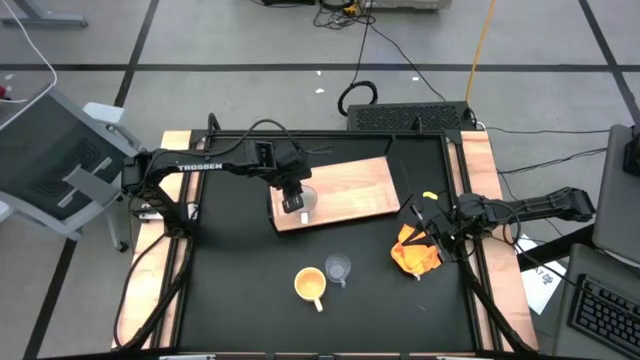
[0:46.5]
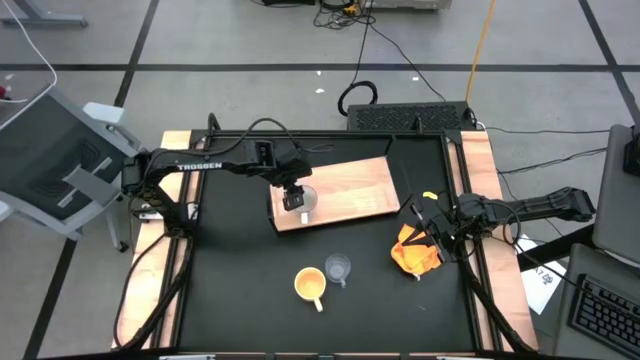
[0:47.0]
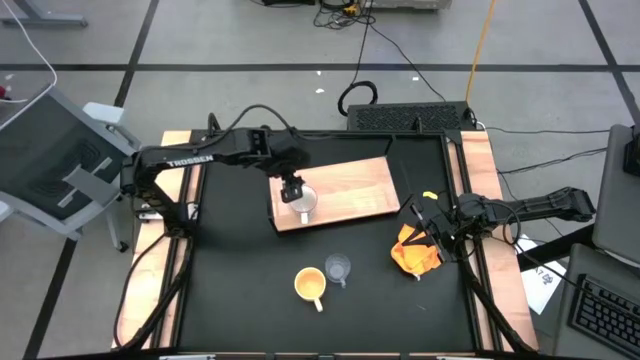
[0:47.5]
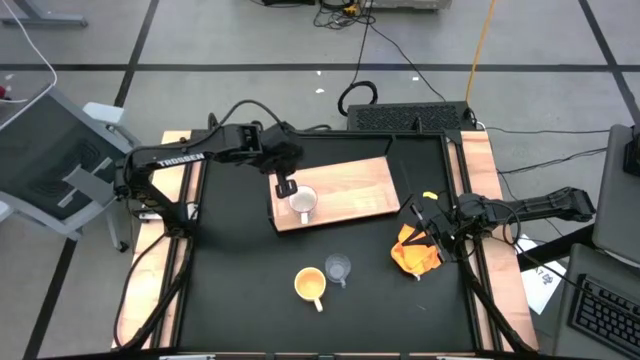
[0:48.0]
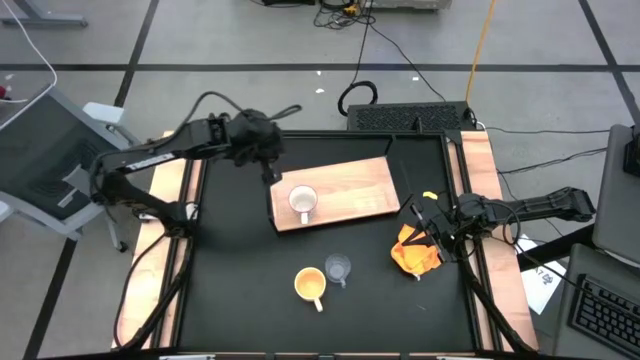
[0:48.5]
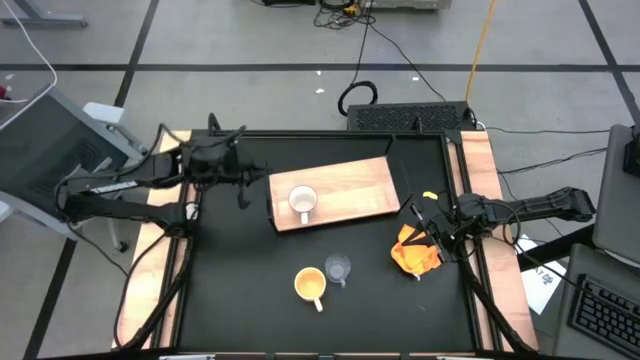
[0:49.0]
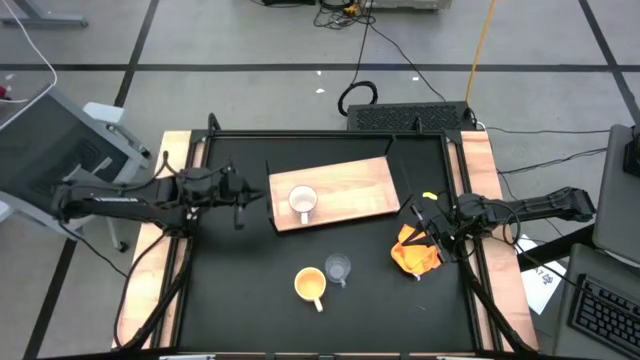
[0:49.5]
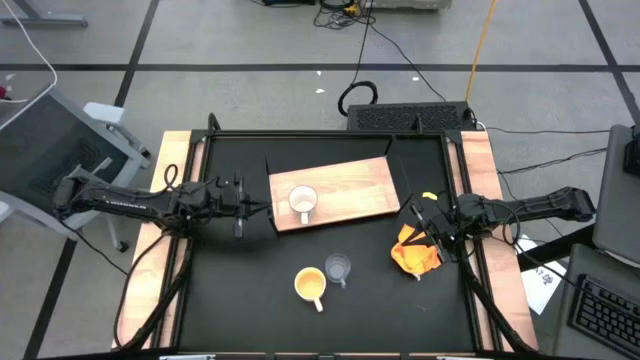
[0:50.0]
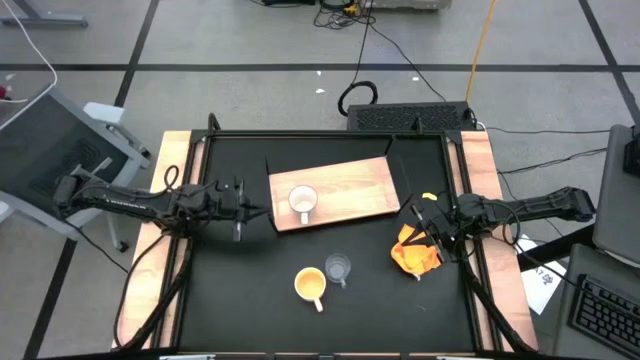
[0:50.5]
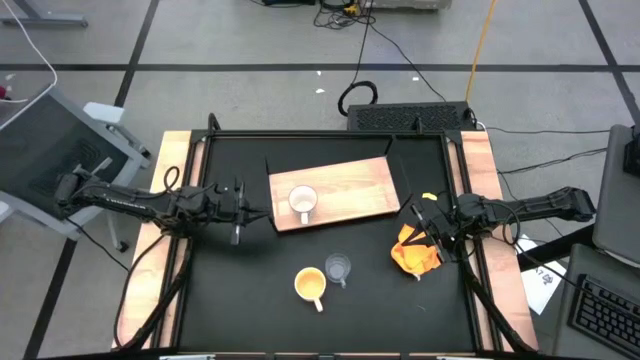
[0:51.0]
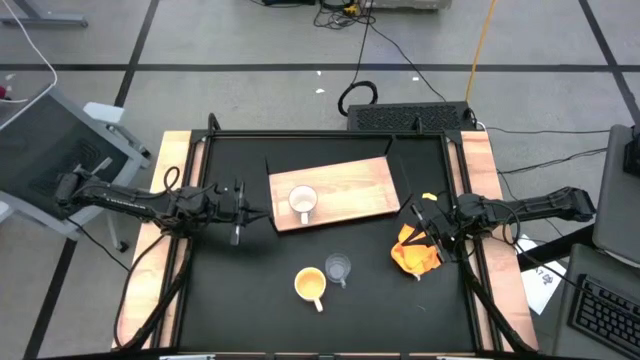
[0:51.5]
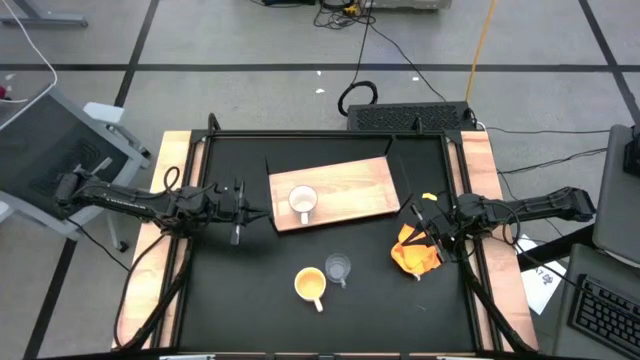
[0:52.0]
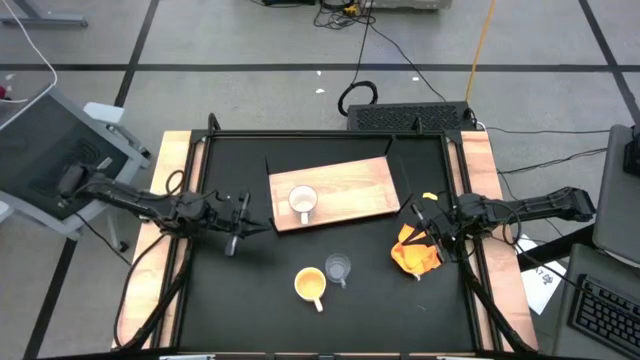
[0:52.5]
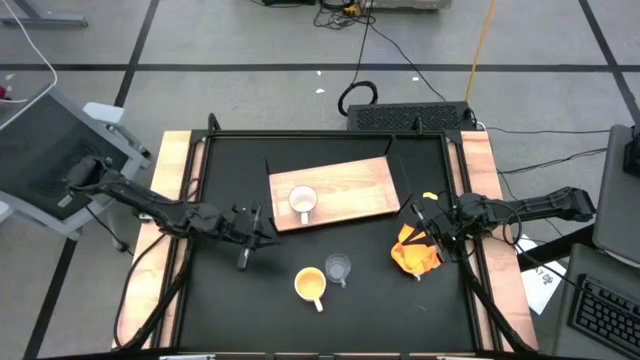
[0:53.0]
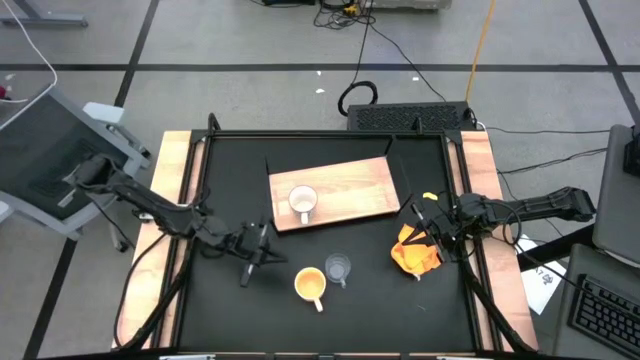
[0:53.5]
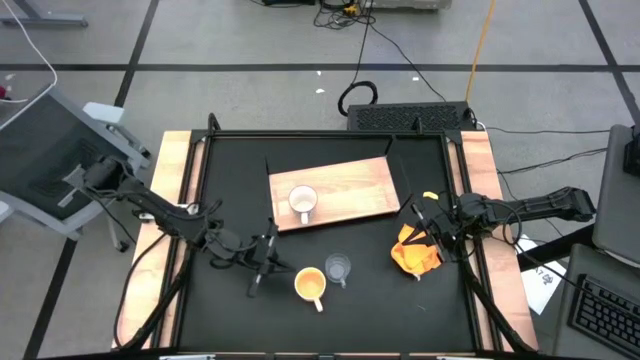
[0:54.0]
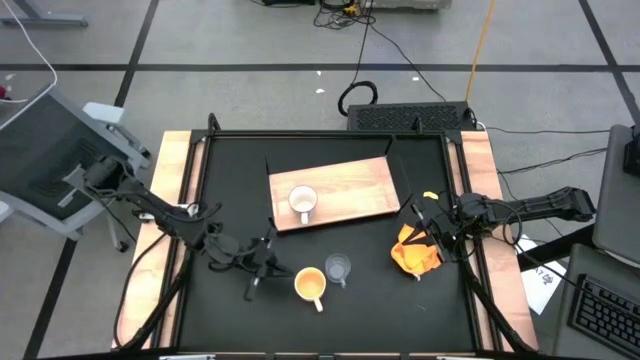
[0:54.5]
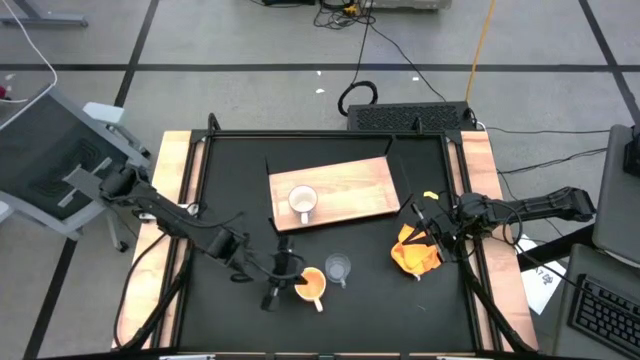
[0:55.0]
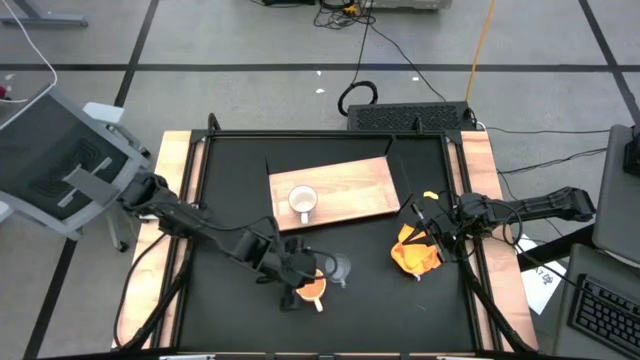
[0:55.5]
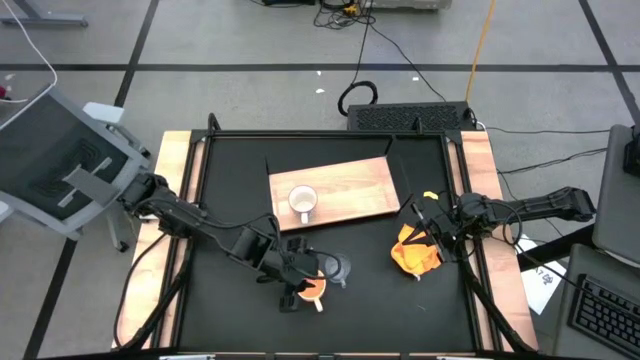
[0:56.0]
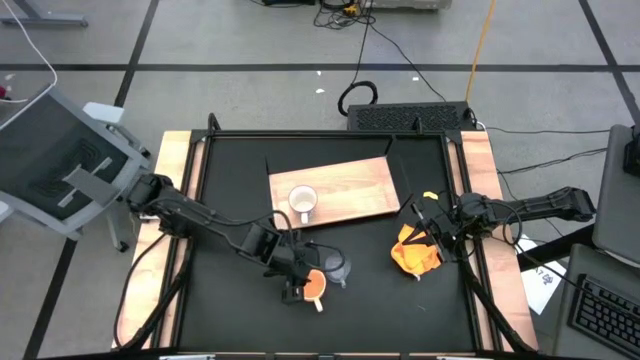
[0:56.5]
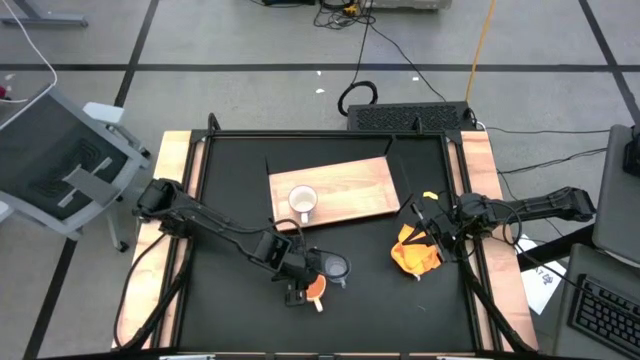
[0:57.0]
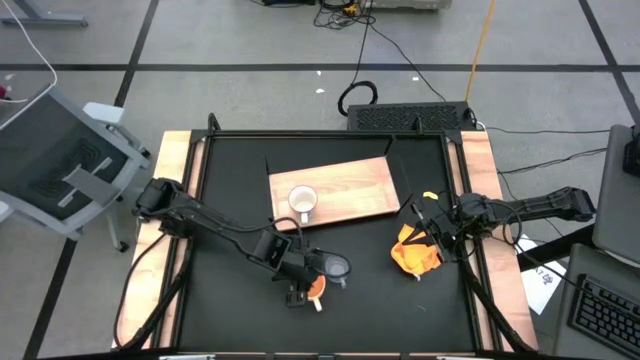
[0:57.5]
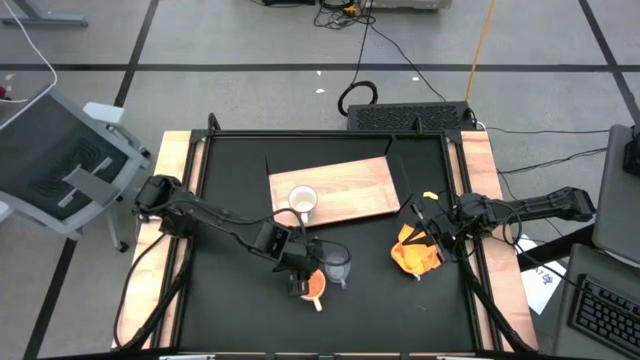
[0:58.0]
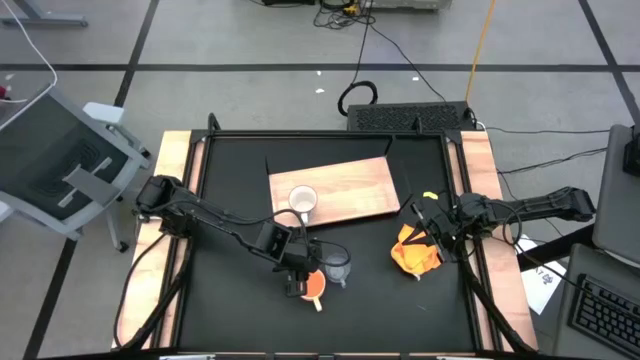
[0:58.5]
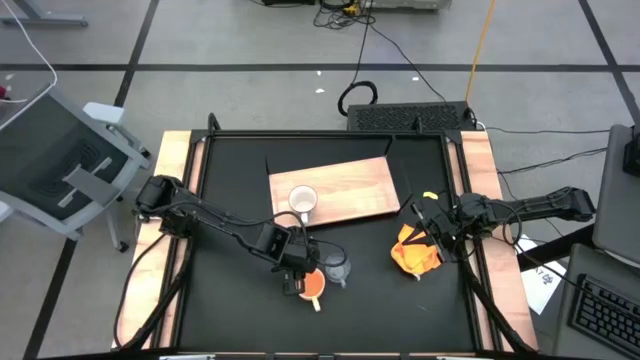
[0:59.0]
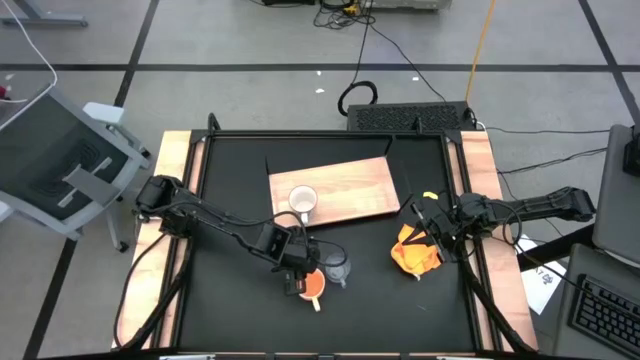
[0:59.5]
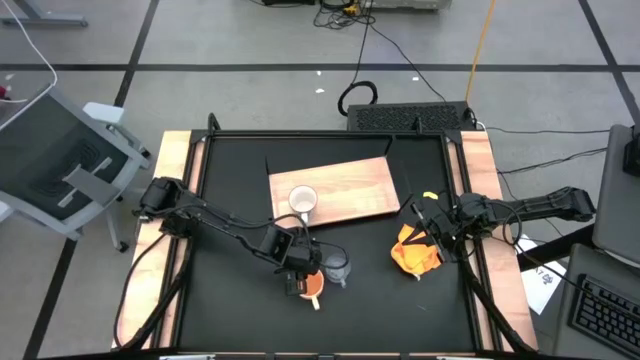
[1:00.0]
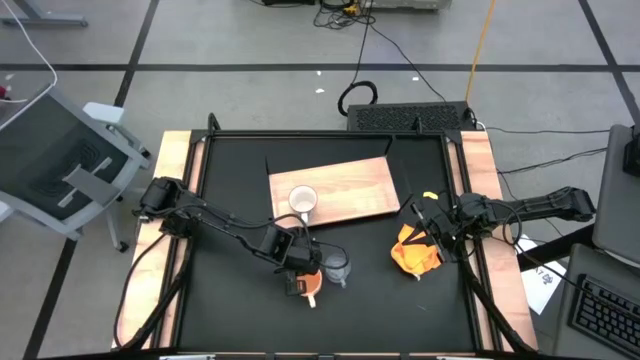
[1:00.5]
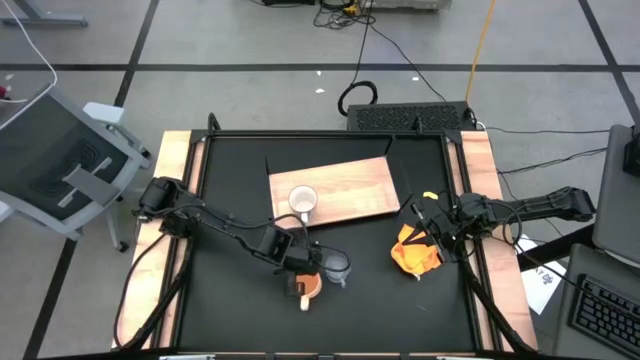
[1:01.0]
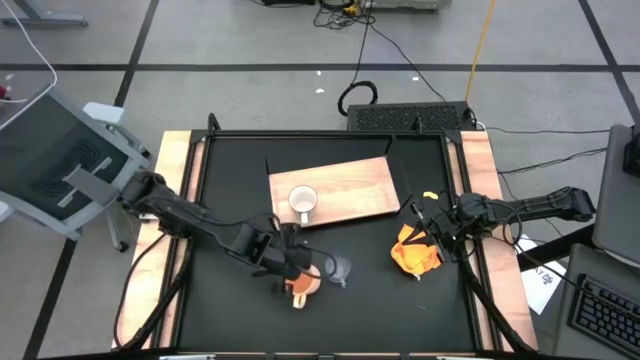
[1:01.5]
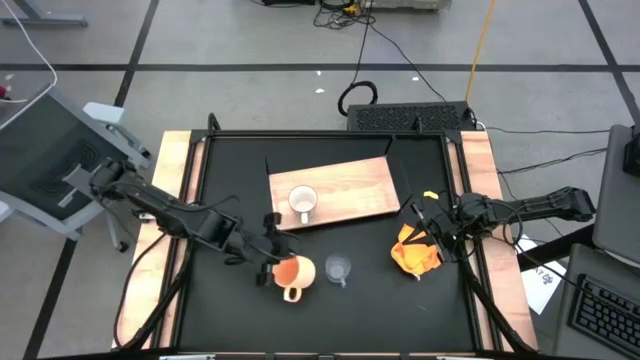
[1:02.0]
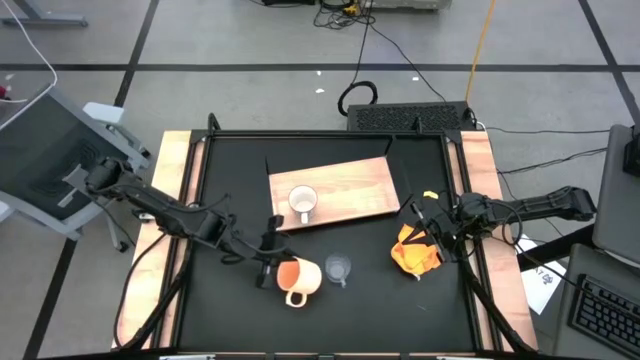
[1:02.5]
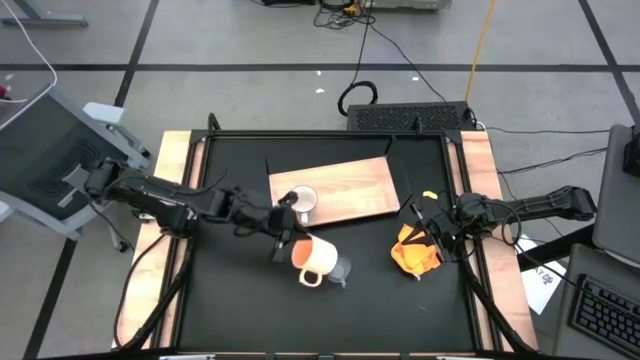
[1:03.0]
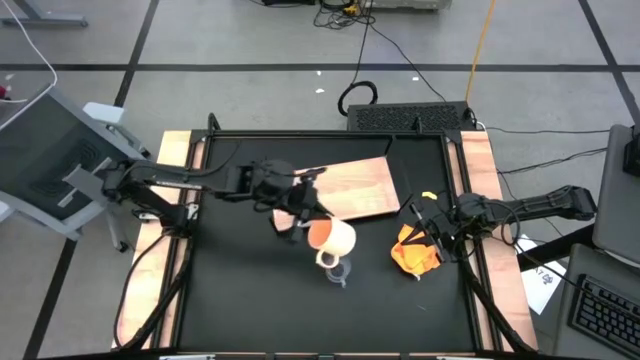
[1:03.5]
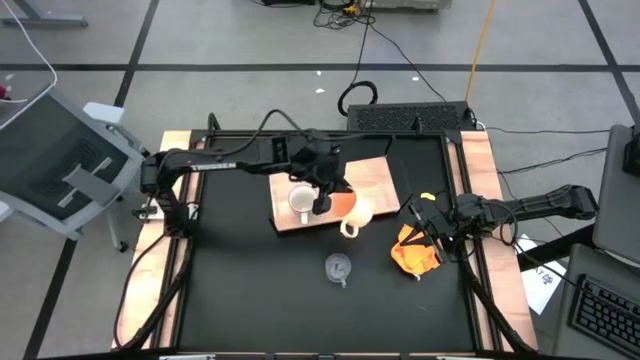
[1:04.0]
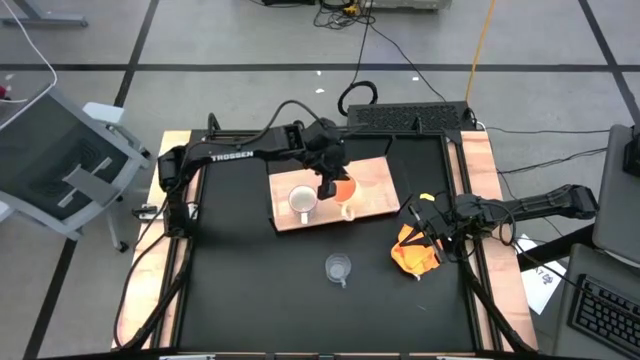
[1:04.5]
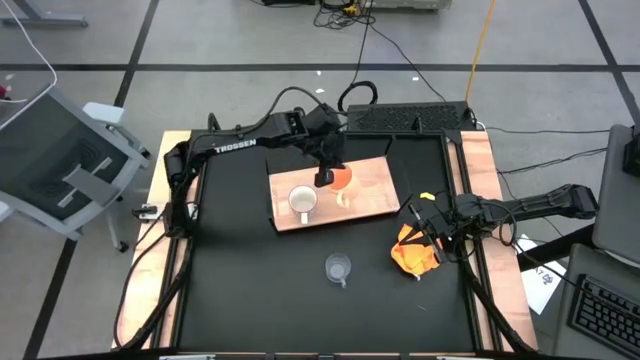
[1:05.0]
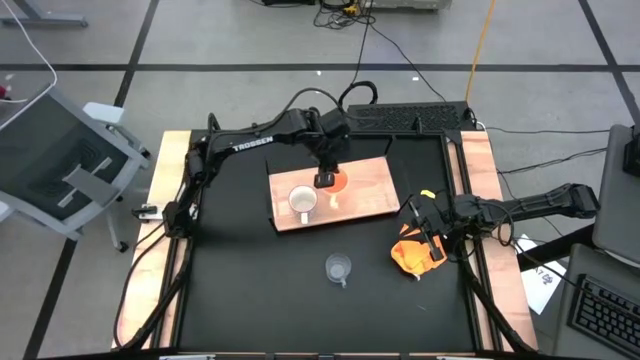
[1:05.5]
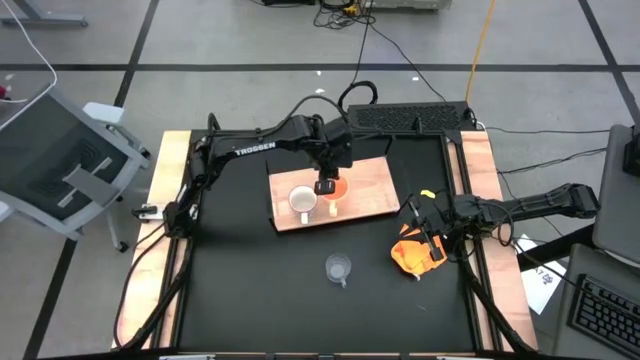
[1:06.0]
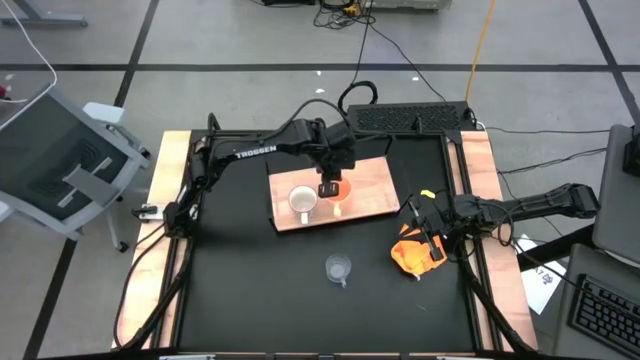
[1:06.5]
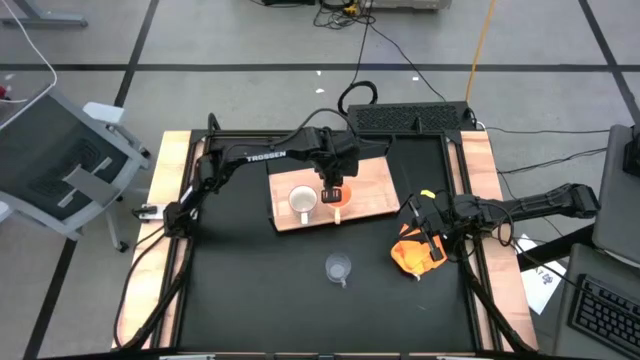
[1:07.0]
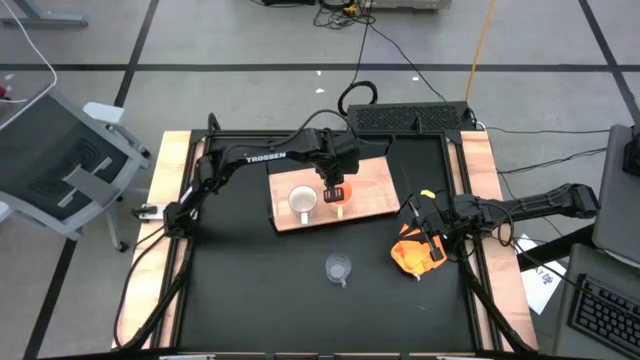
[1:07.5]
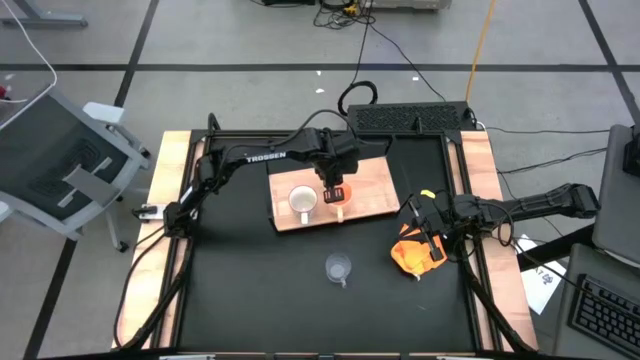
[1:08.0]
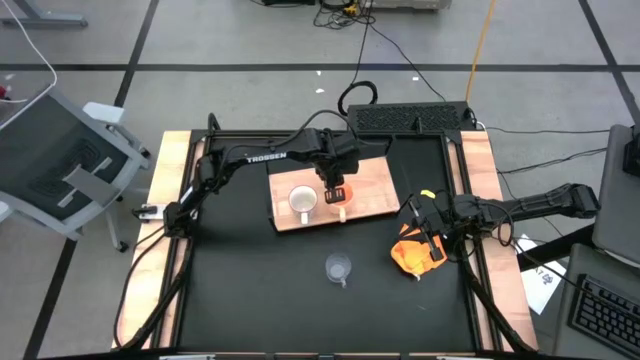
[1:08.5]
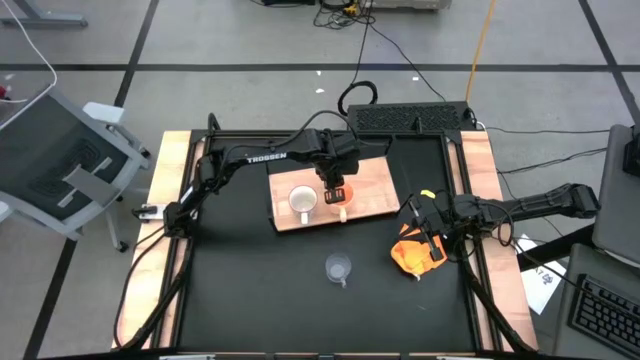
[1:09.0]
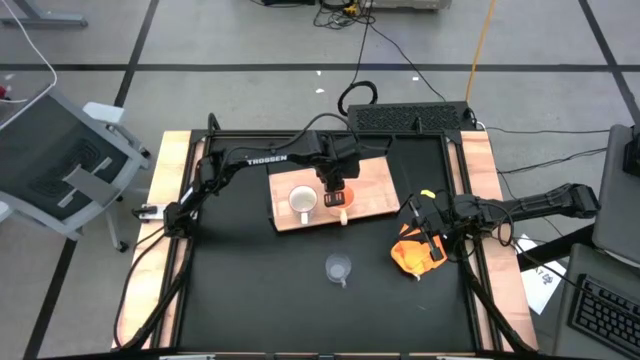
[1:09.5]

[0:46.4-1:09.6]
Task: Stack small to large cups/mugs on shelf
Put the orange mug on the shelf
